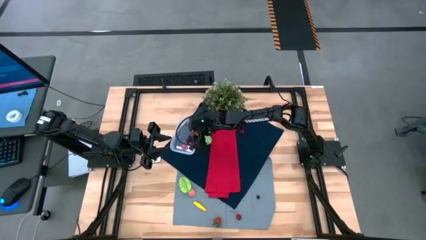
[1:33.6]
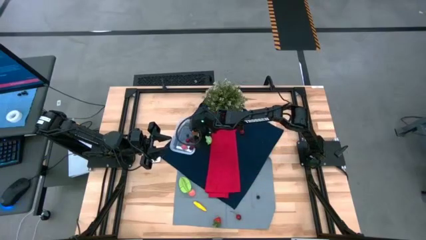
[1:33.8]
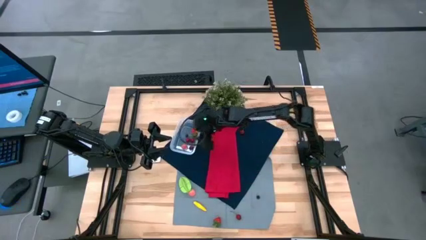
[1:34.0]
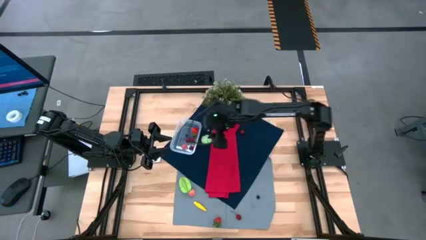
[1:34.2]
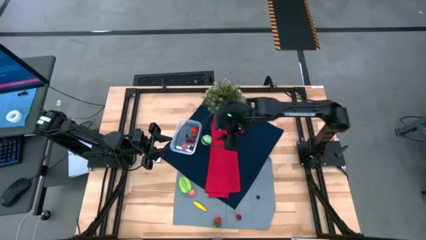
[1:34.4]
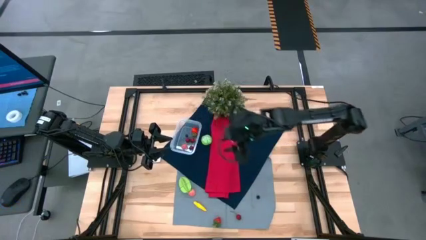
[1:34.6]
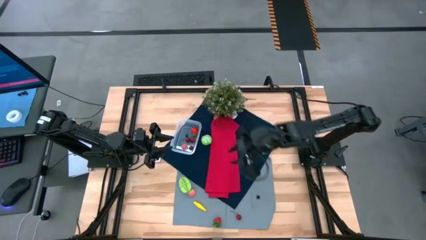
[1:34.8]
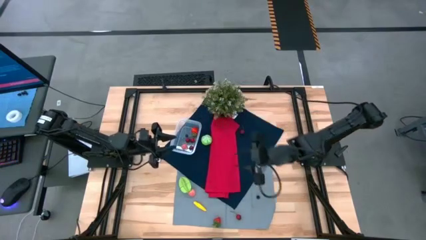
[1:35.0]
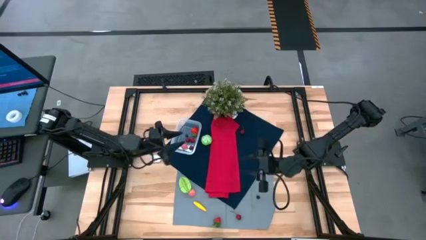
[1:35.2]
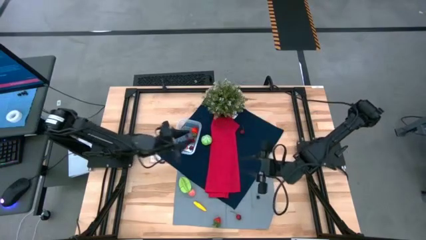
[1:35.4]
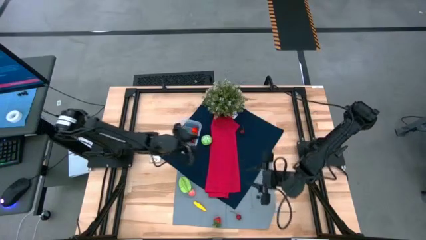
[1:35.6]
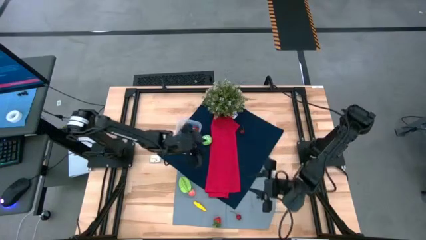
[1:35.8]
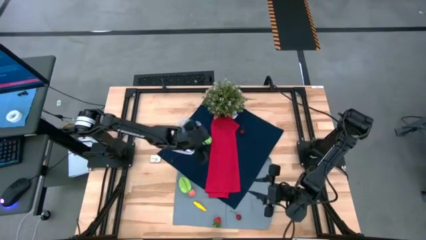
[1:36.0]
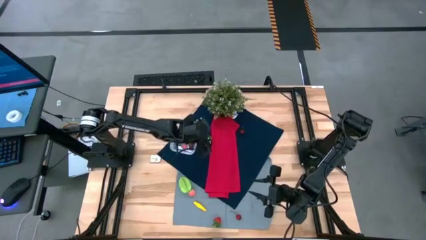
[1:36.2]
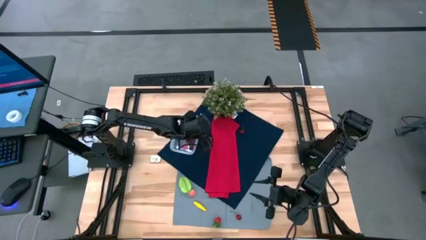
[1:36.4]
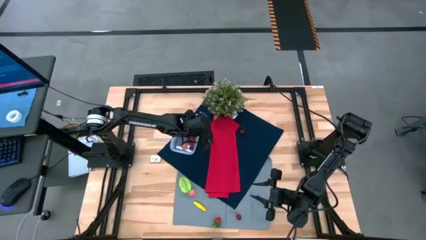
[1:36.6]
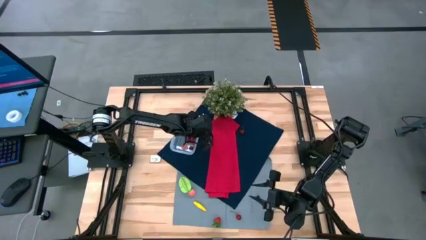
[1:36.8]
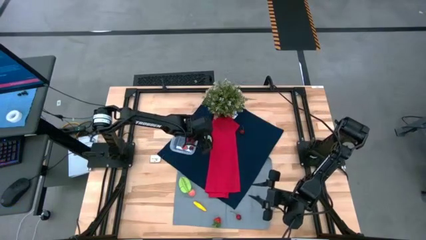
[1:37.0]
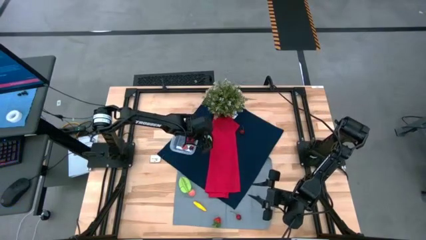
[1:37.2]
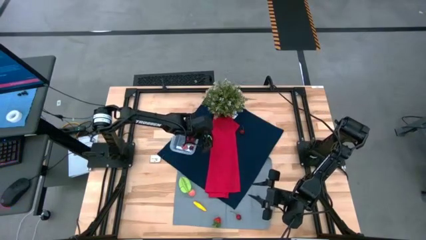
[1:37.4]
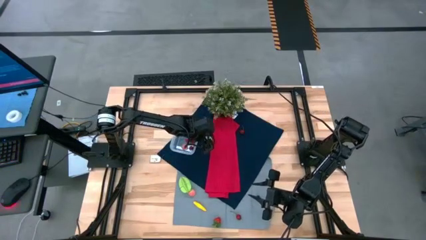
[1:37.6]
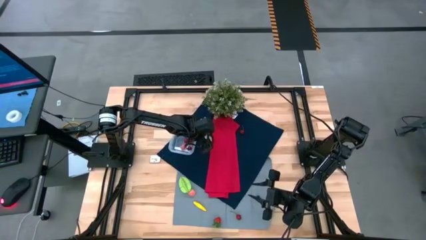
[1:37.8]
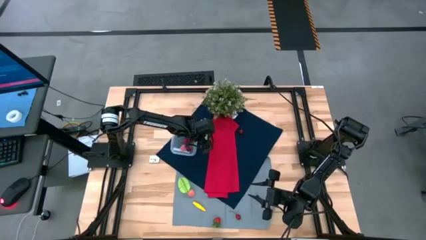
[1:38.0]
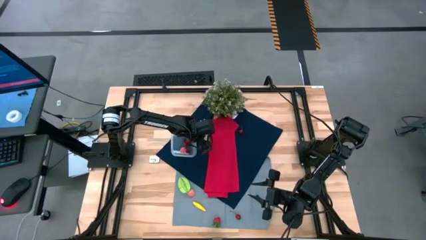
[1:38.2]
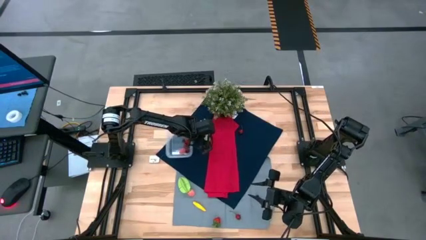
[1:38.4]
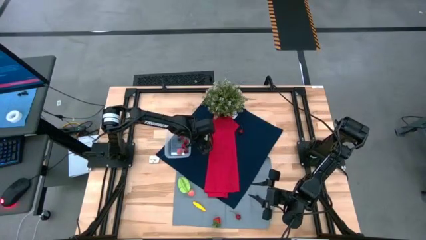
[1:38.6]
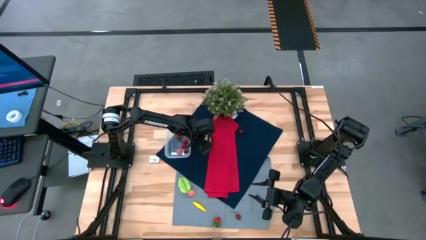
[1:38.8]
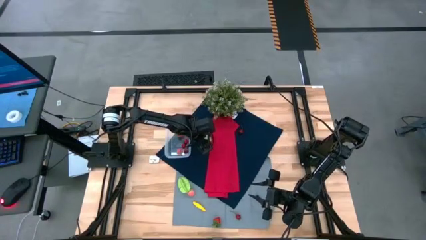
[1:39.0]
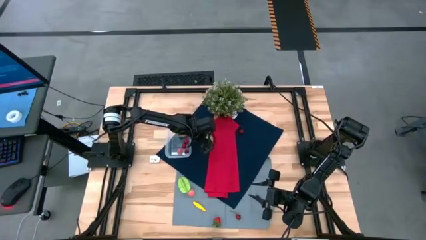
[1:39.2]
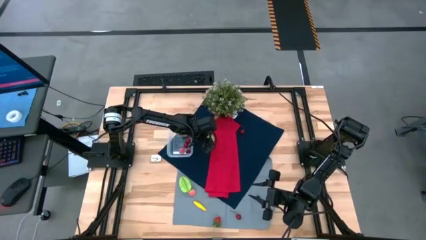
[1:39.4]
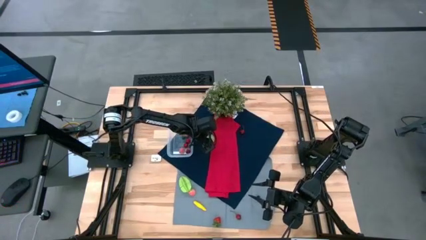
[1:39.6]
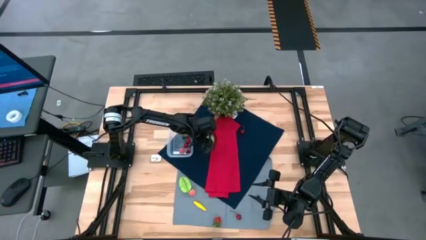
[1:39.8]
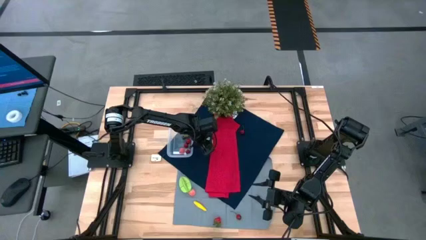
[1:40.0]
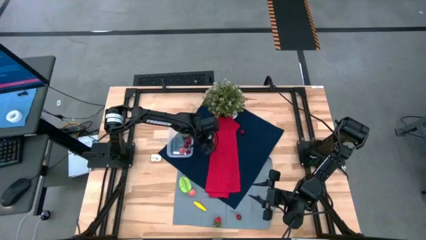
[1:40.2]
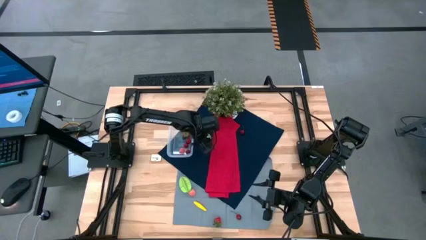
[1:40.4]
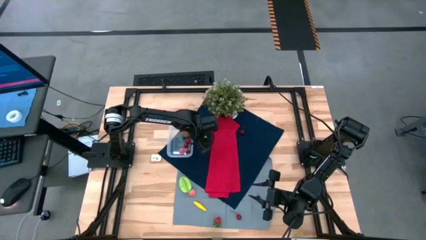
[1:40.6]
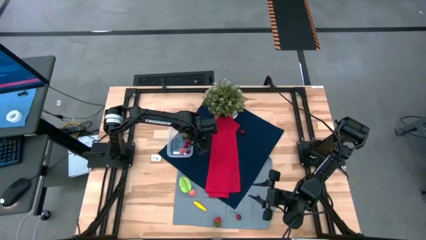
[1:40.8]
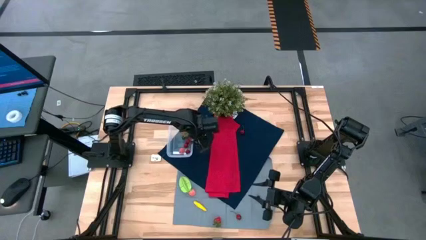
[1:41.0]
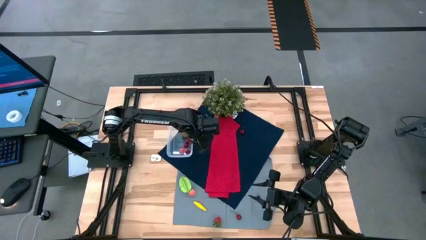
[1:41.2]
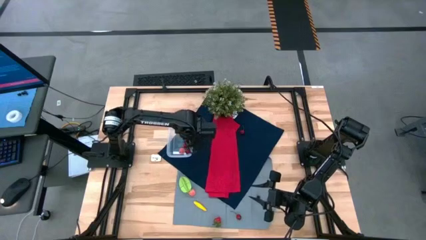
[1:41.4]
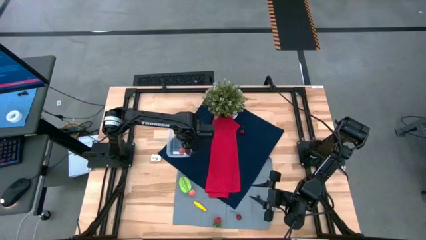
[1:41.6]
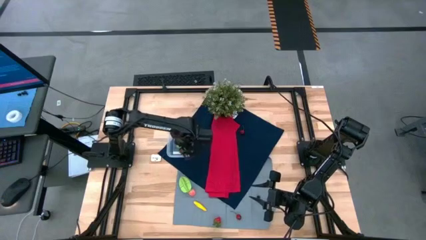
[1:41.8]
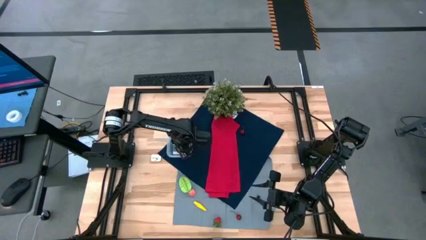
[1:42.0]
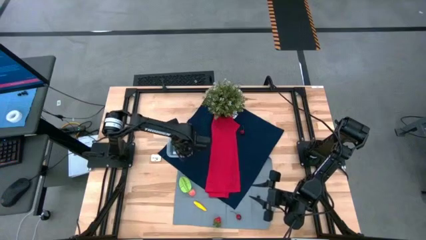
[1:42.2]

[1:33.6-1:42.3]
Task: Pick and placing Produce into tupperware
Put the green cabbage into the transparent bin

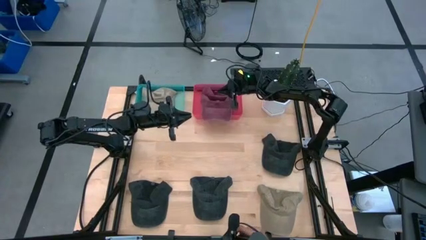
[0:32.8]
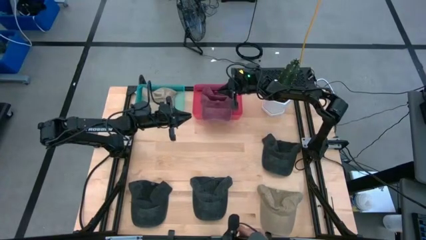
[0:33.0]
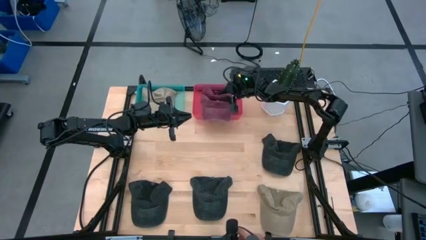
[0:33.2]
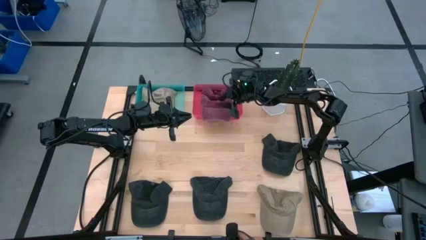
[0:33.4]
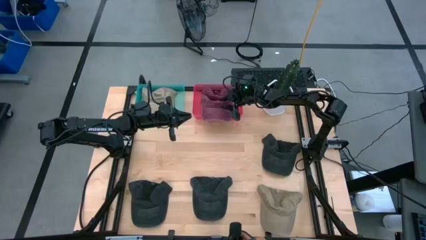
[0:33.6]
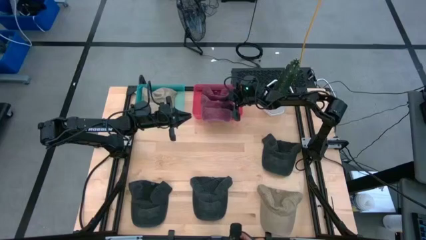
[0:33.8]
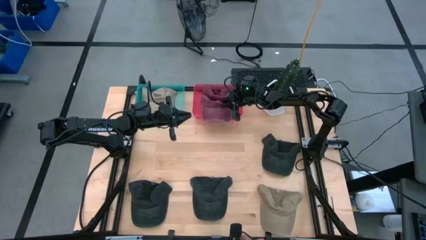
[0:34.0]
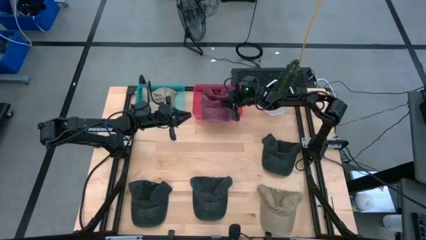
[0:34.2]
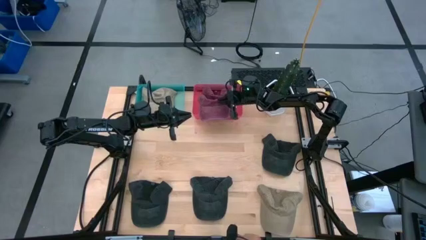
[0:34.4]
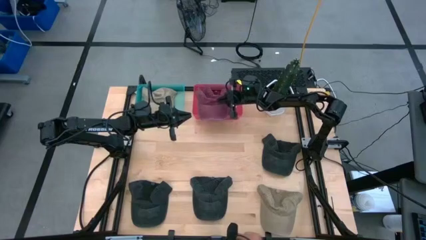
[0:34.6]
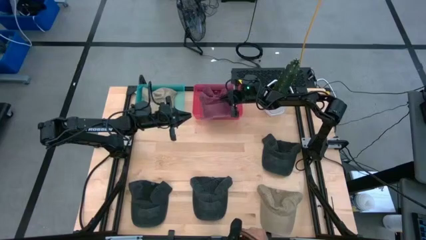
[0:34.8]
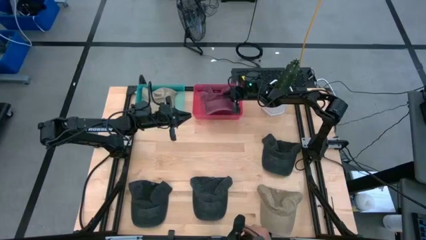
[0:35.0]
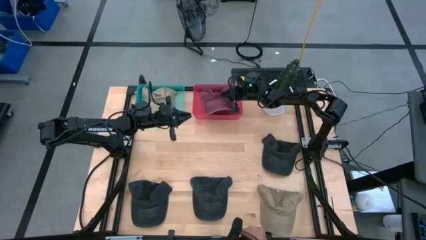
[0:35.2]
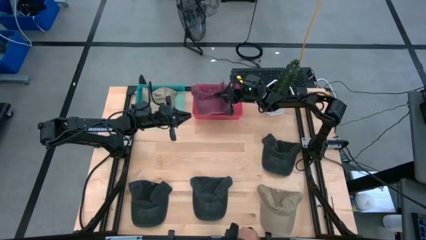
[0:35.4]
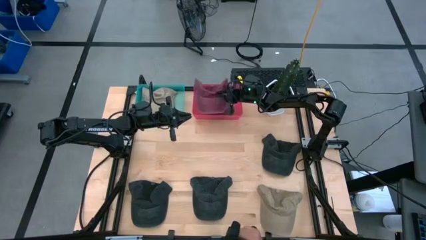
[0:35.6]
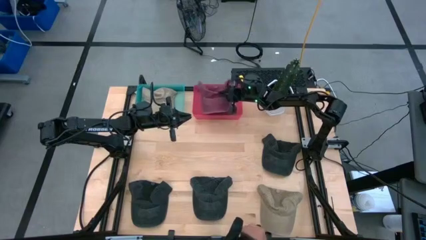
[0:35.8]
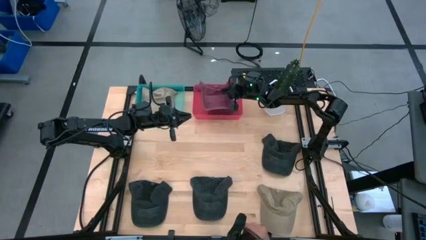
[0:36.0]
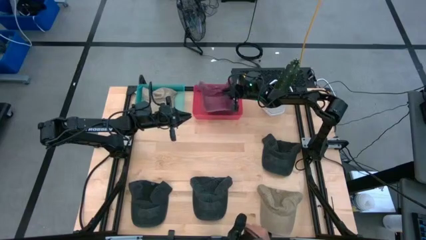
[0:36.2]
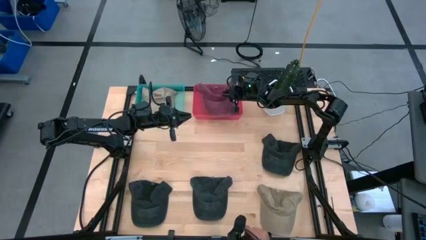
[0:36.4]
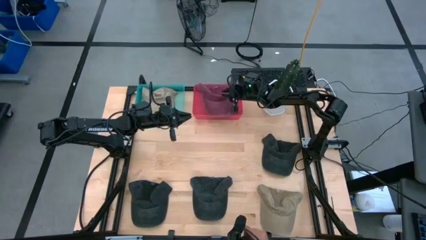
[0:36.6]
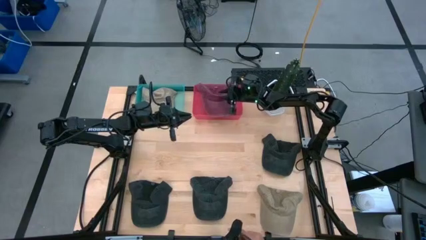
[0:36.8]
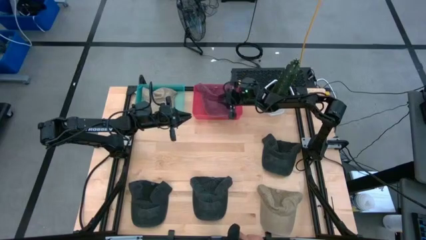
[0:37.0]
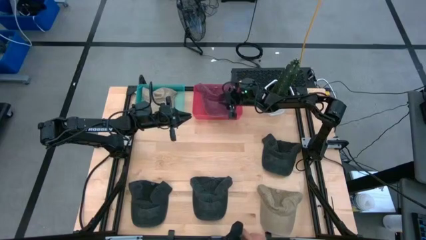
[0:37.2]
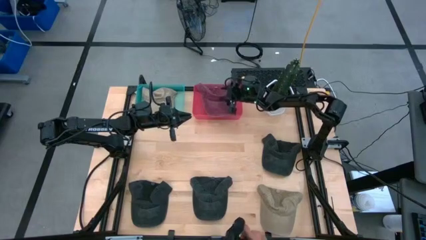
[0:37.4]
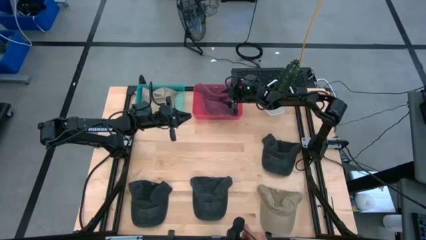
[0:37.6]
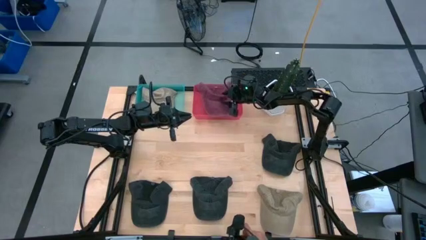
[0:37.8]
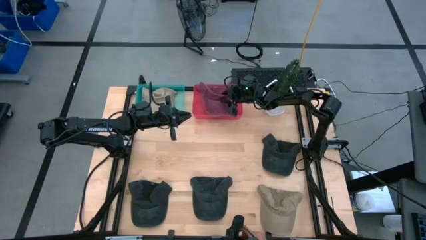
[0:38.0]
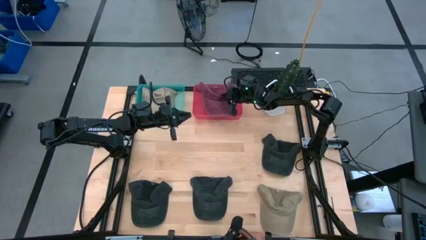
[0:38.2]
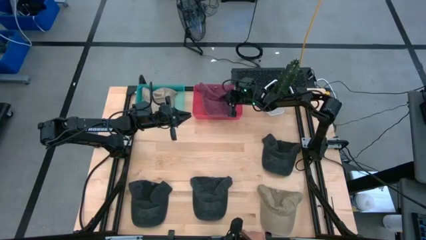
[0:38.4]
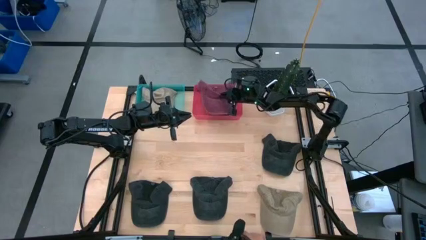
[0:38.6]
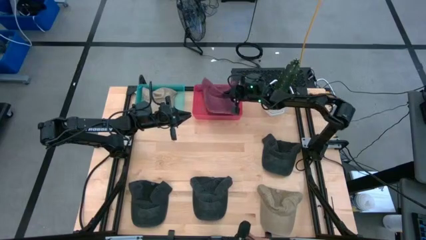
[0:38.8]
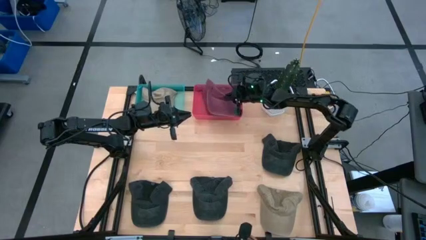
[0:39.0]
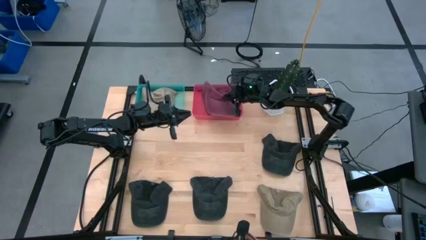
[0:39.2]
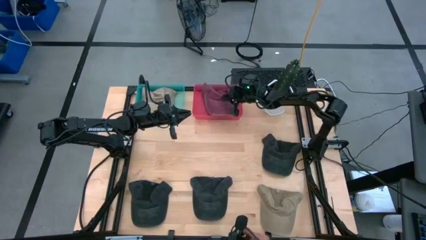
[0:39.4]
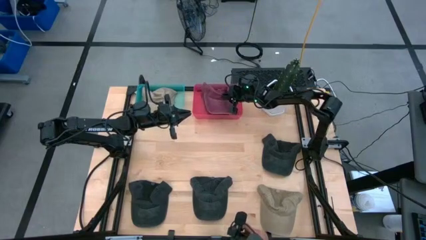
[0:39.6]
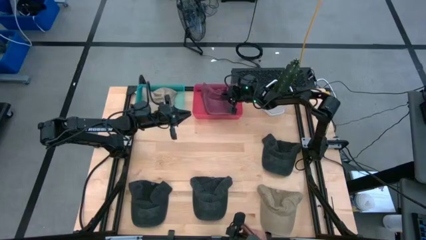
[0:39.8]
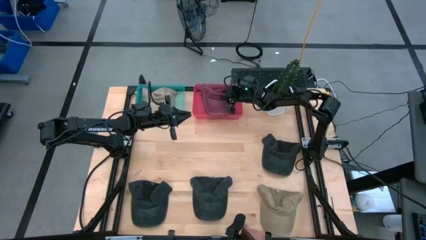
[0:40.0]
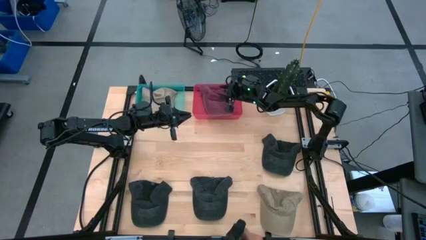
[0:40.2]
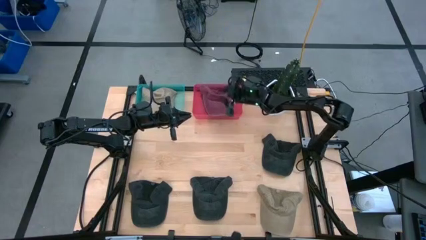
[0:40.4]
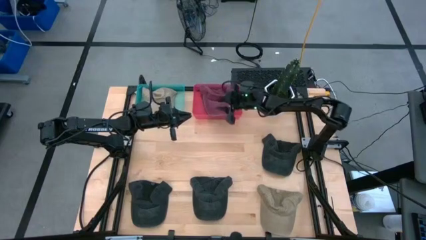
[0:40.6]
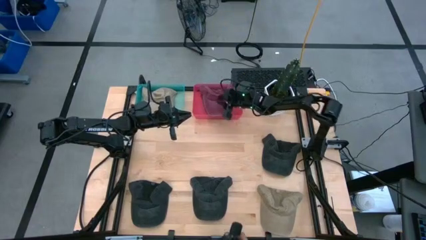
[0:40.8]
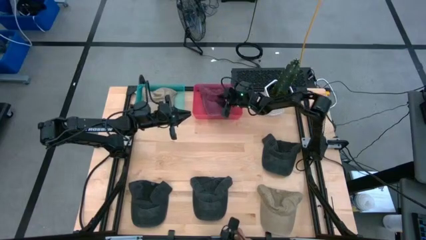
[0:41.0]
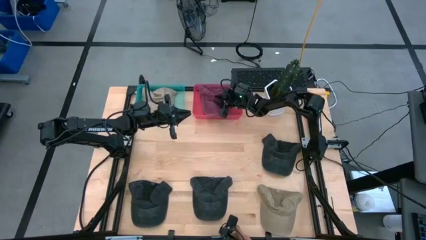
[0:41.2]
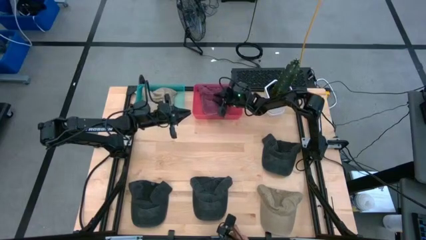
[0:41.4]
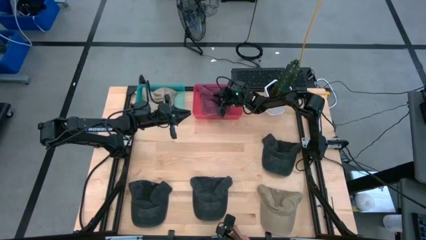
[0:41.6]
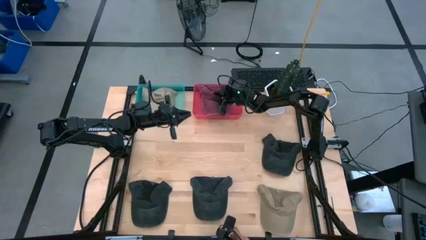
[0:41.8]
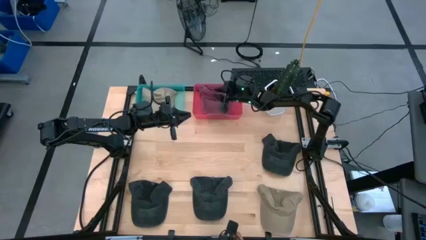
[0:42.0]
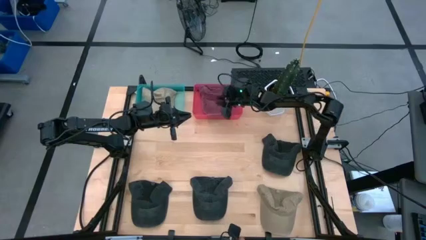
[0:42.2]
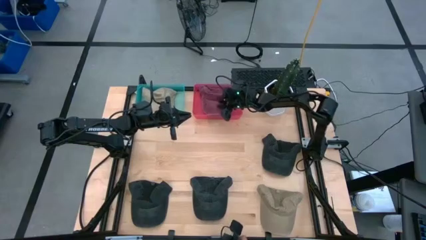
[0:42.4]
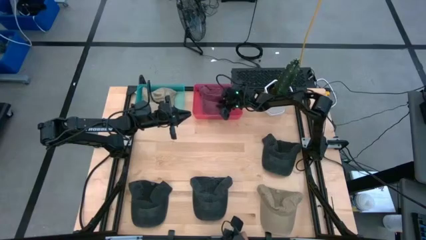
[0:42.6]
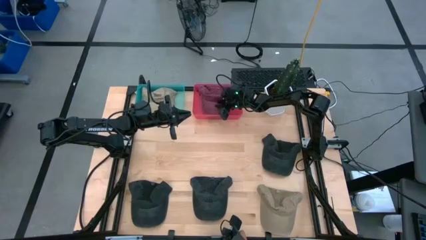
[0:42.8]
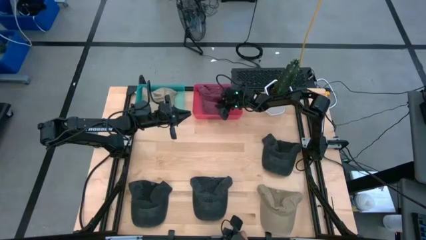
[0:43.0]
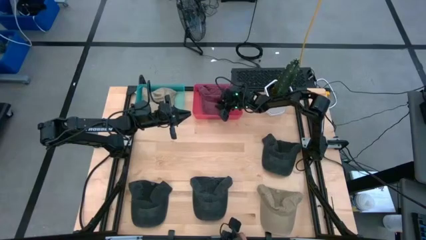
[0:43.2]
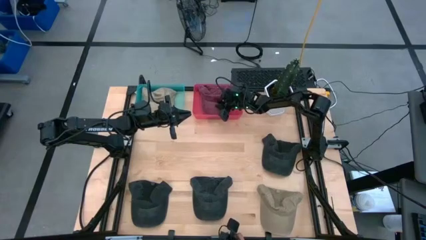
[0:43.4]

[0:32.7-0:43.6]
Task: Pick & Place hat
Put the red cap into the red bin
